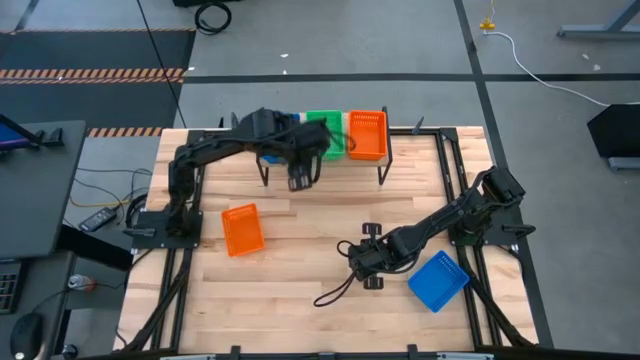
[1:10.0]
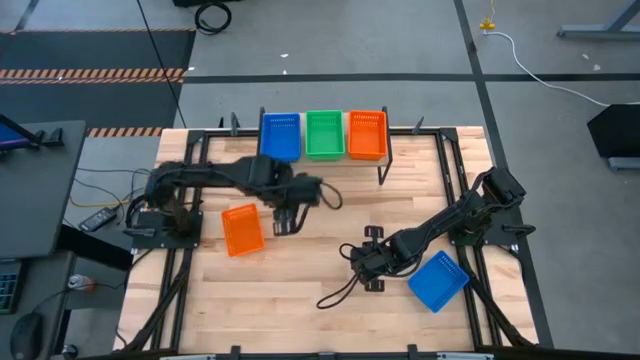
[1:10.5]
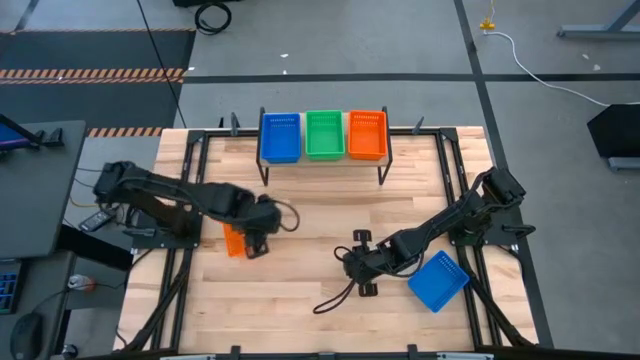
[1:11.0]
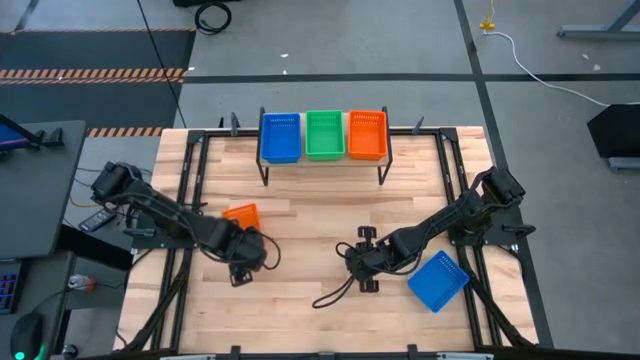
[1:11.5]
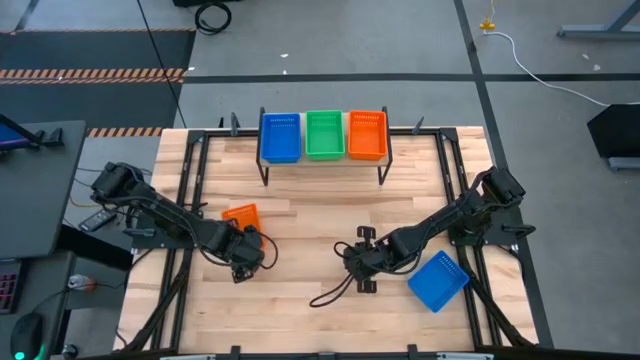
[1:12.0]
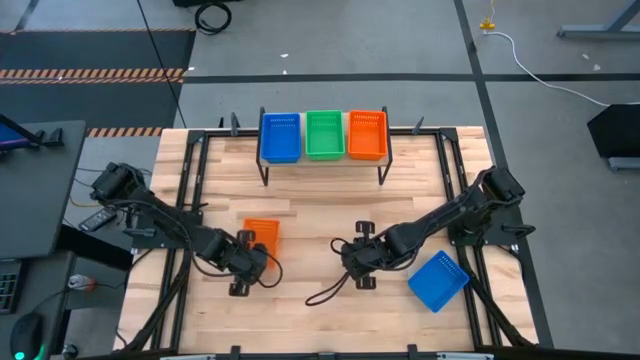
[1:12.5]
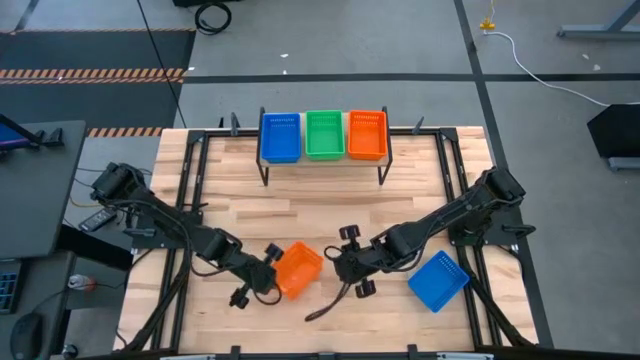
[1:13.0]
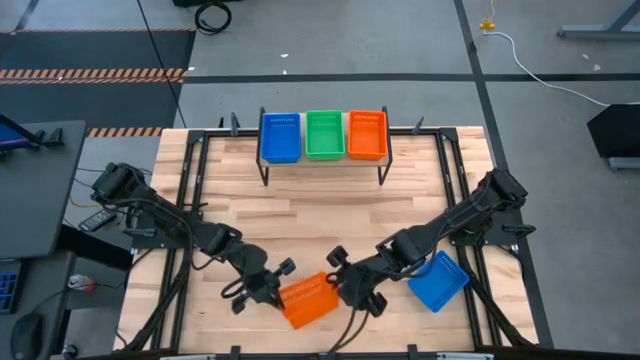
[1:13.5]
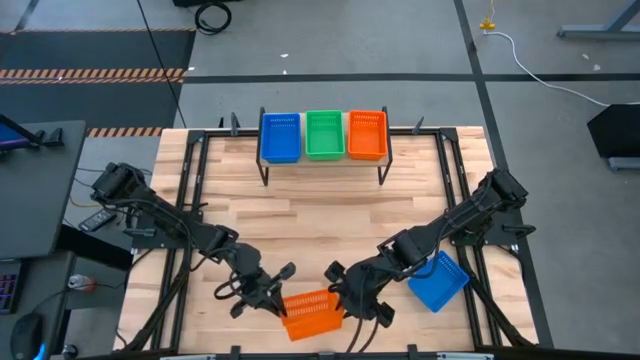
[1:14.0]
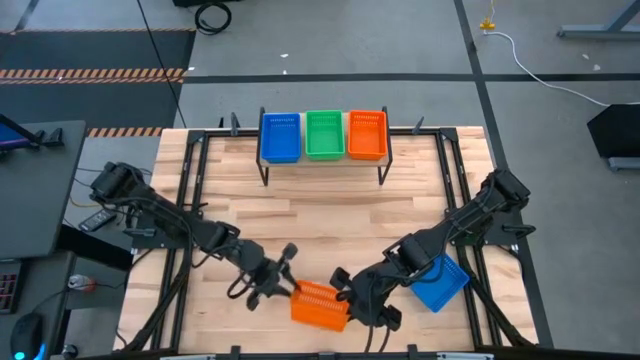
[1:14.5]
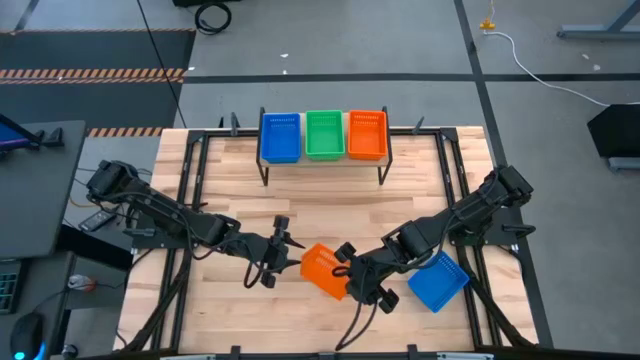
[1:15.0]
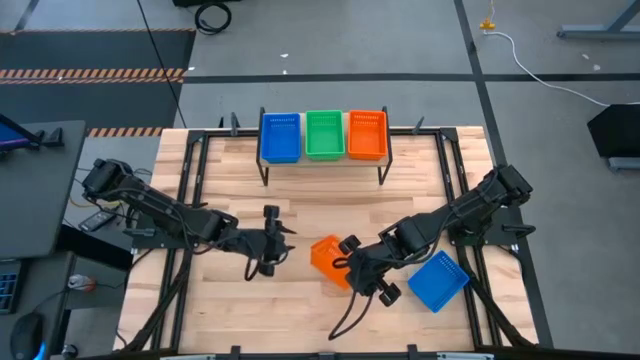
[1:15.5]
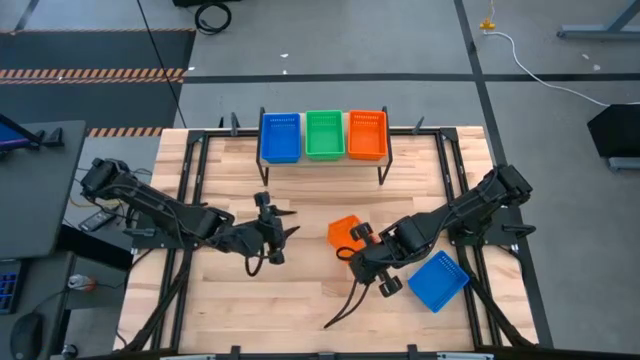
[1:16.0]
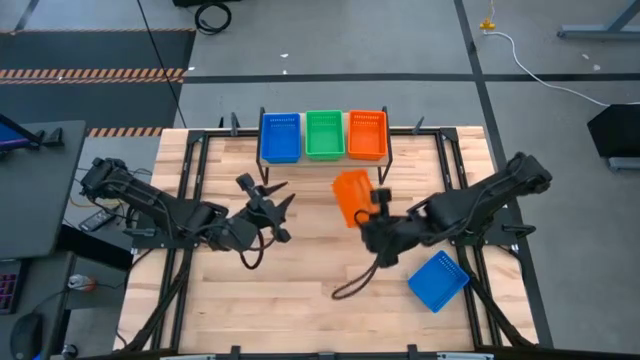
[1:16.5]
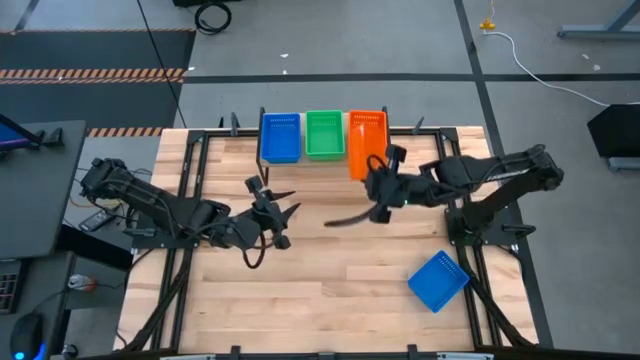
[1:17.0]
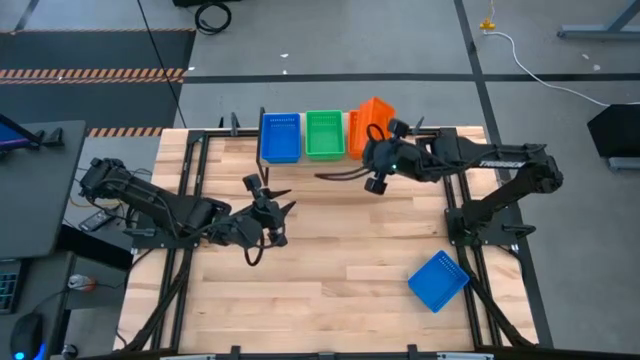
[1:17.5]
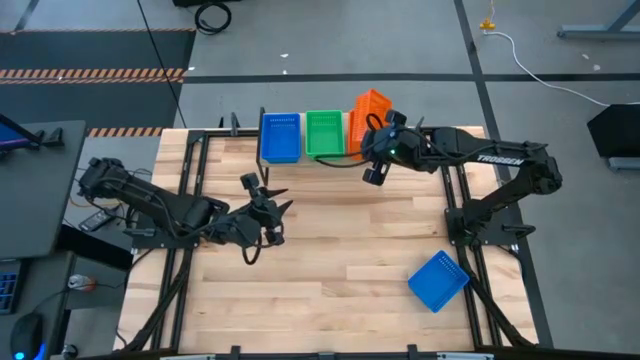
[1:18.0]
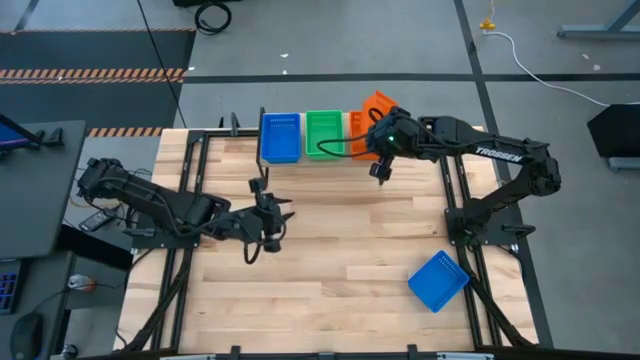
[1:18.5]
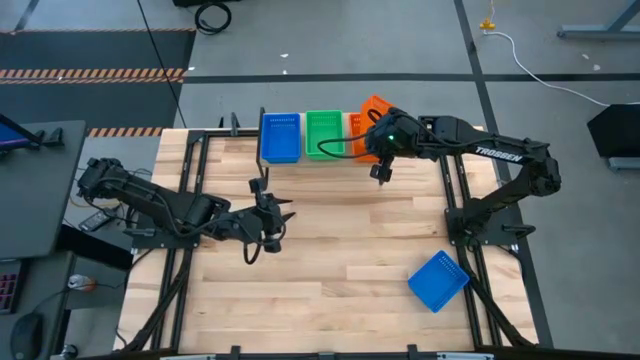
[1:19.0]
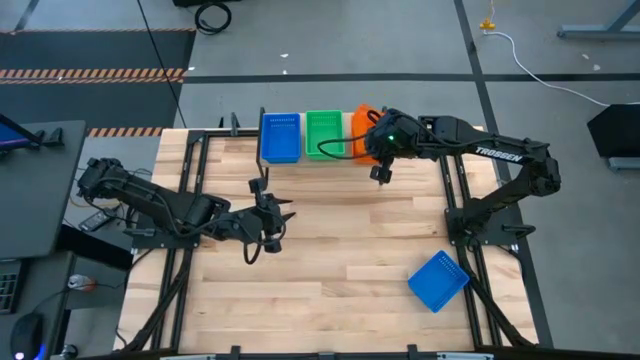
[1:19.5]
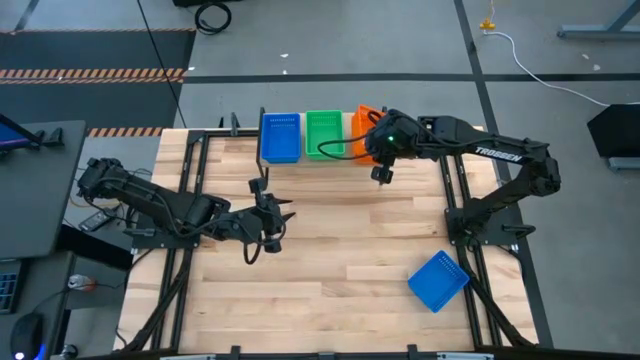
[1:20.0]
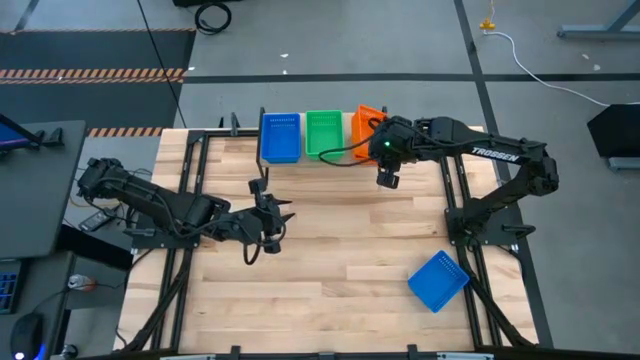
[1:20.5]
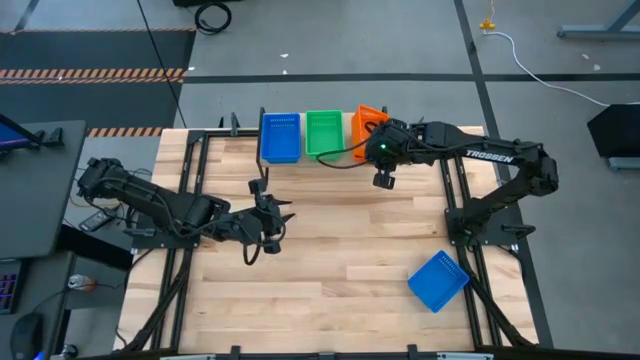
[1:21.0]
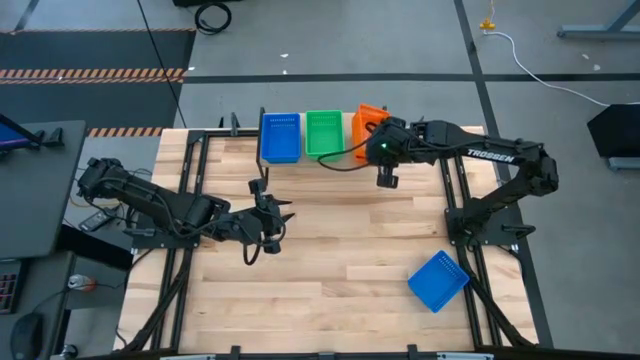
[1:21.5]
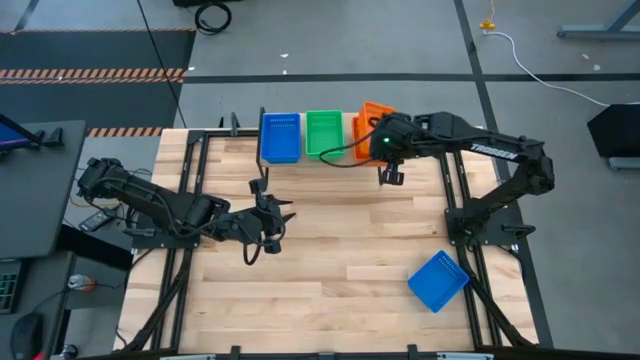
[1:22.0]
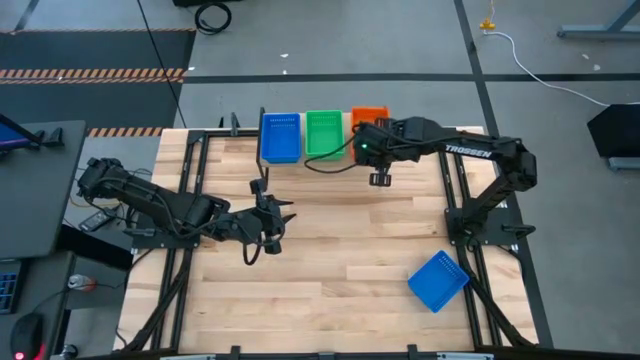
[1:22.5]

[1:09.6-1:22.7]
Task: Stack baskets on shelf by color
Stack the orange bin on top of the orange bin on the shelf

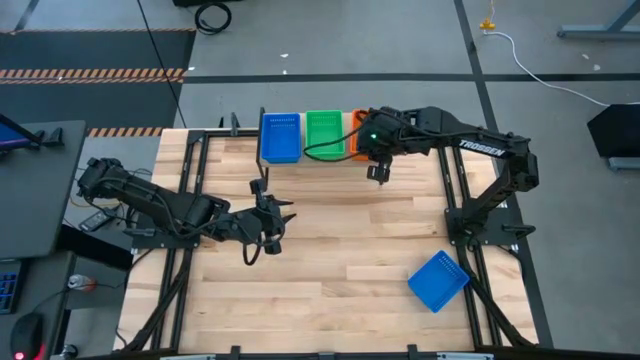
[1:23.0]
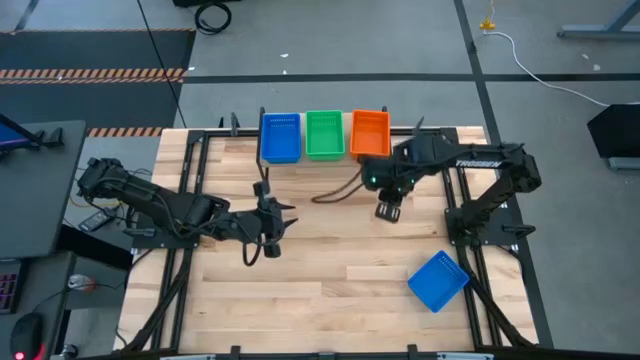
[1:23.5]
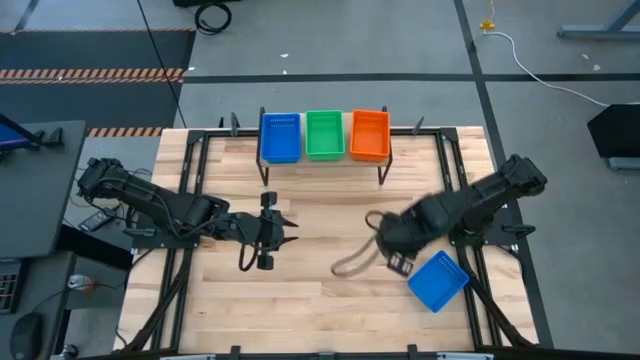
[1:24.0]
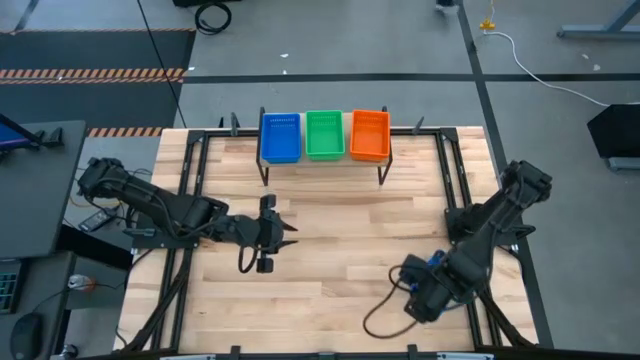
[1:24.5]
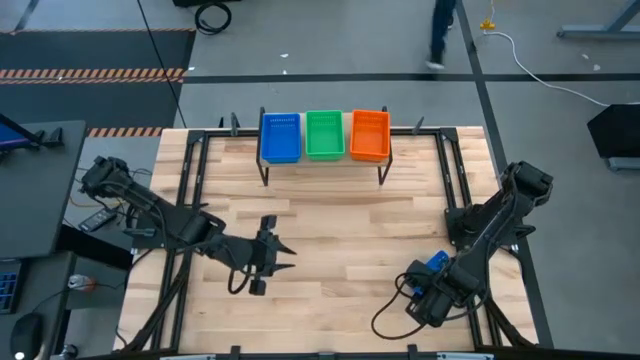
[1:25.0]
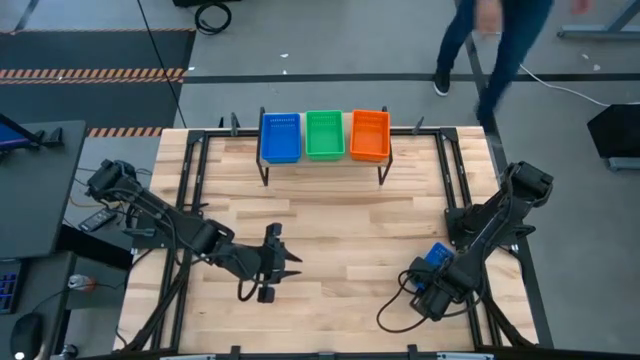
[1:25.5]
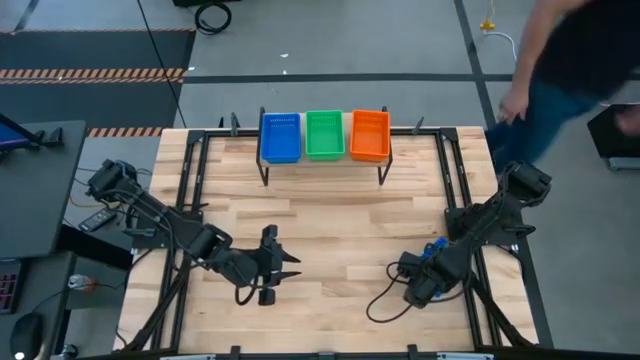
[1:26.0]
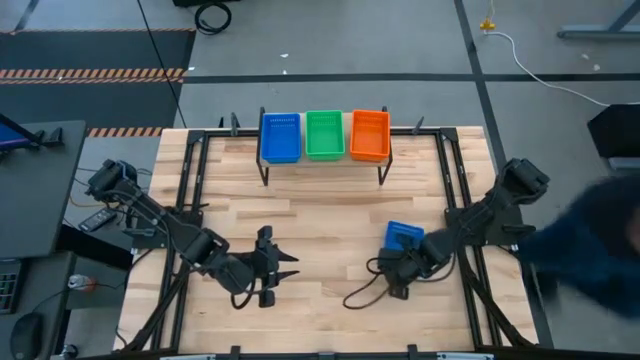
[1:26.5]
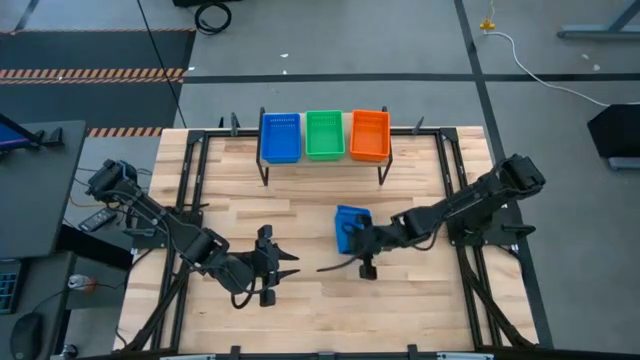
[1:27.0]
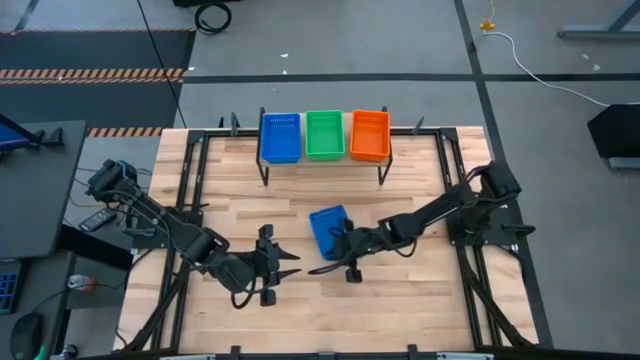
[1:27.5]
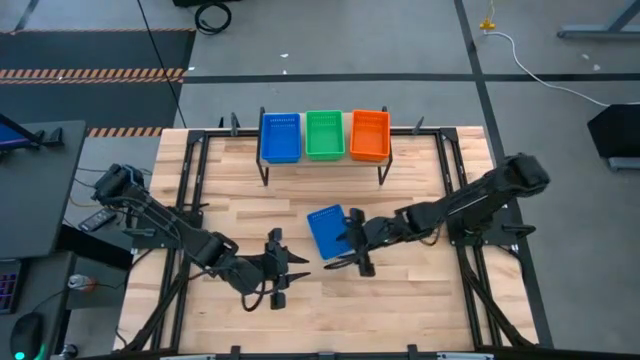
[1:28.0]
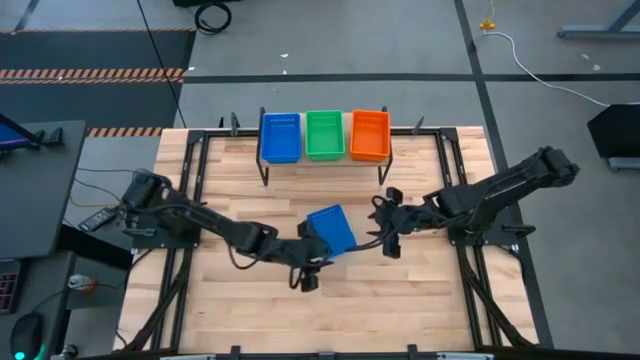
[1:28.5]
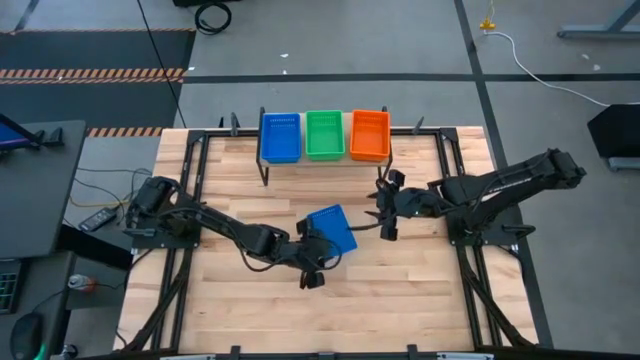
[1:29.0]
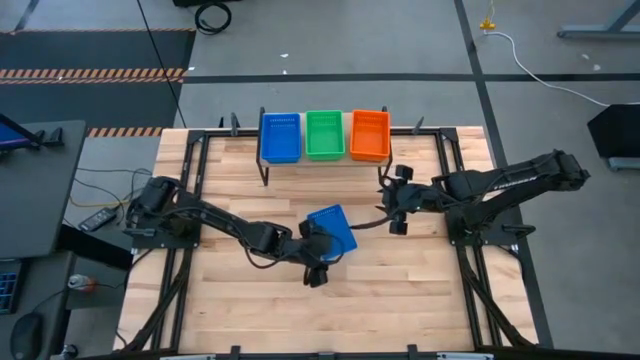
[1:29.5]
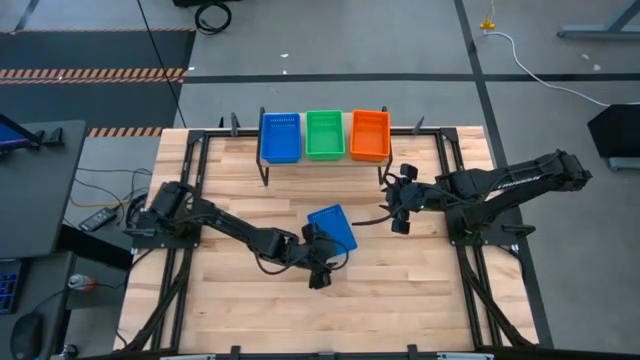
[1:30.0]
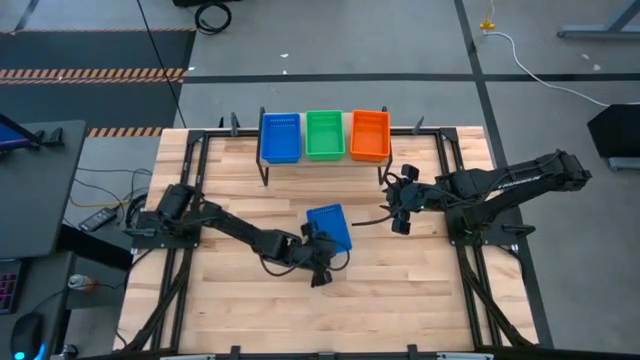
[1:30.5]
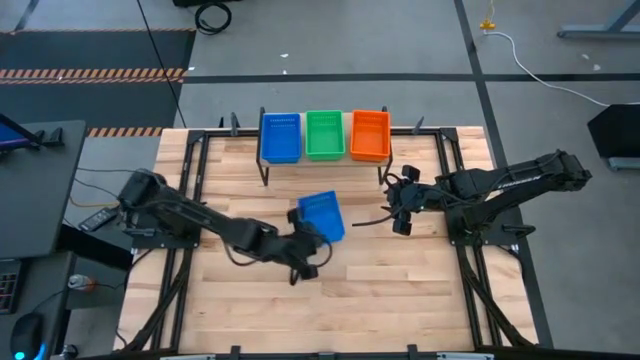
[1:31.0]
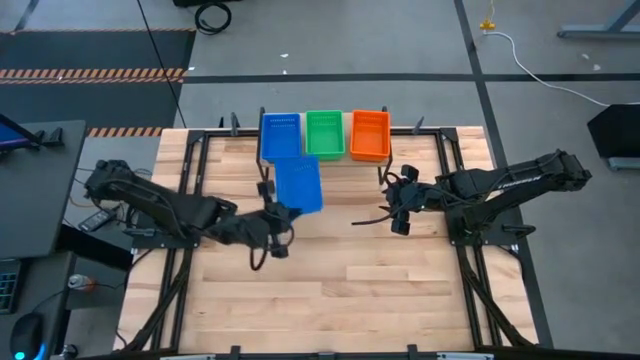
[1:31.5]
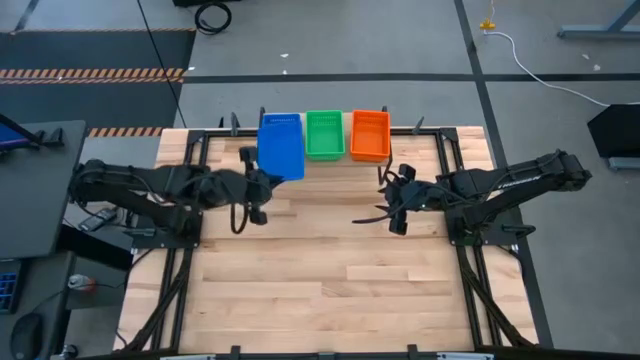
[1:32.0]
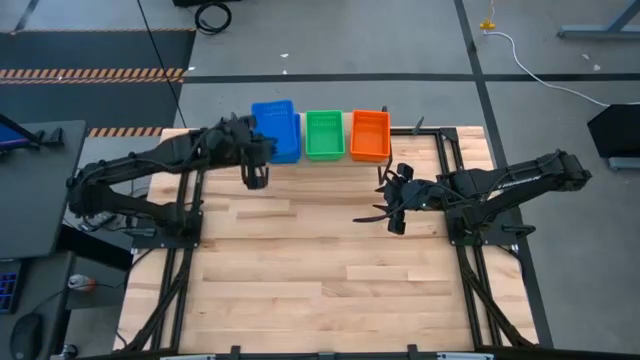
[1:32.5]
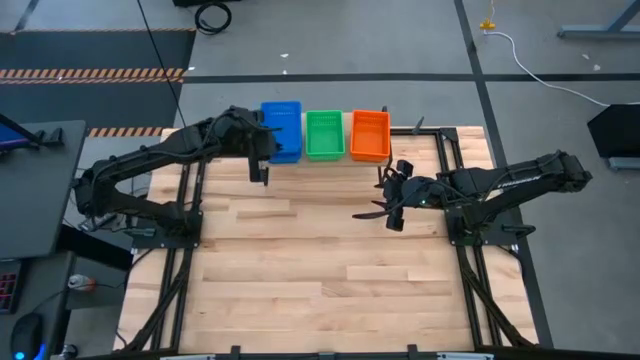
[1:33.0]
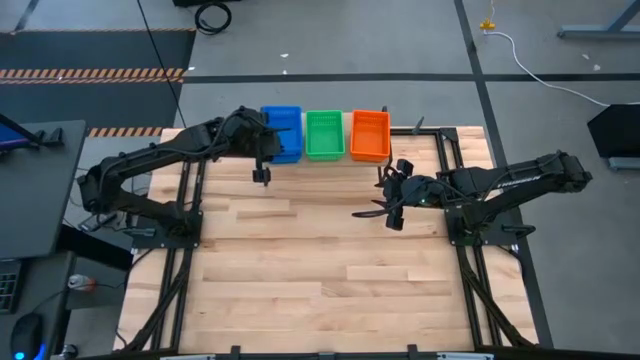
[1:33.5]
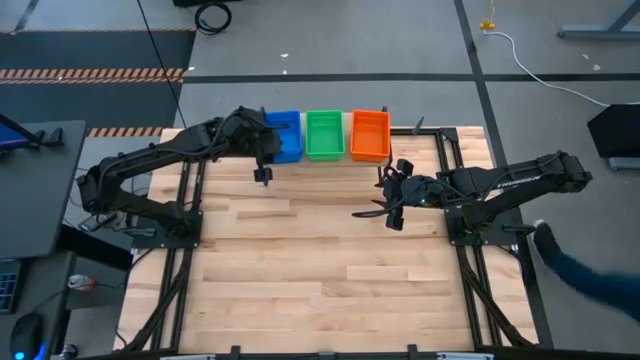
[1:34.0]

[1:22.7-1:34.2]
Stack the blue bin on top of the blue bin on the shelf
